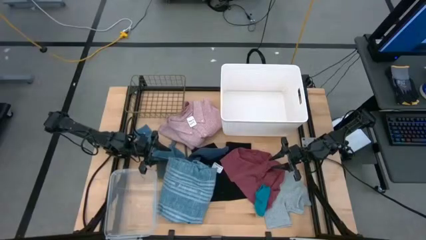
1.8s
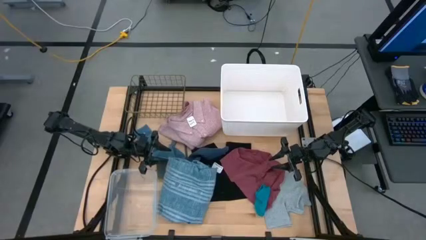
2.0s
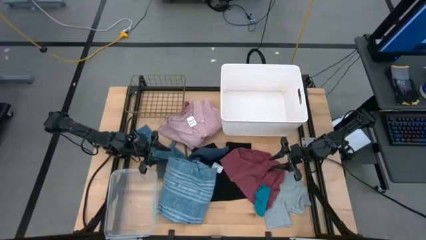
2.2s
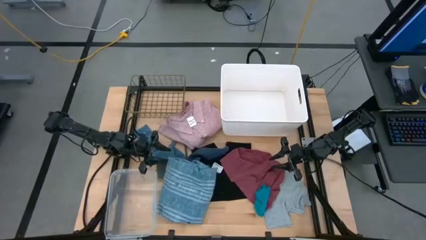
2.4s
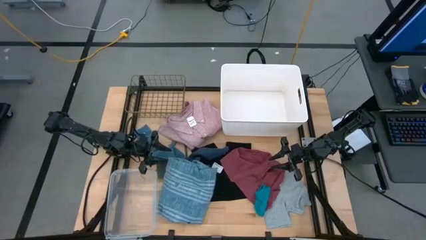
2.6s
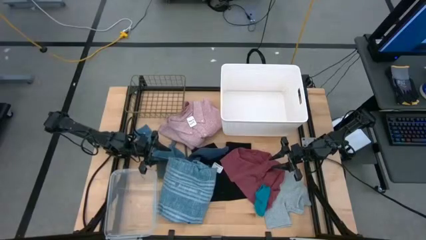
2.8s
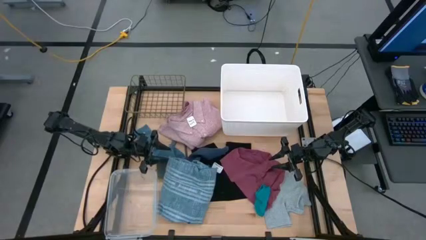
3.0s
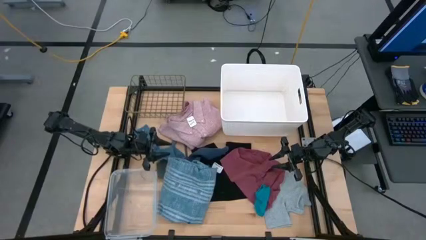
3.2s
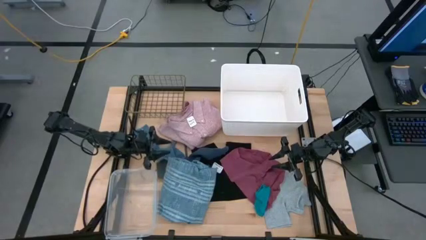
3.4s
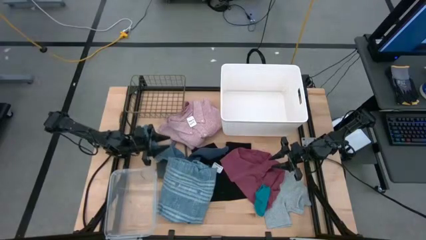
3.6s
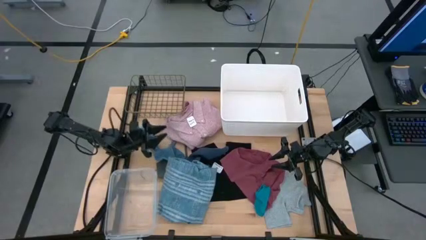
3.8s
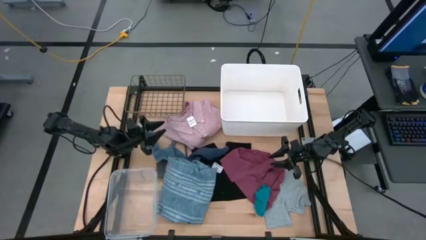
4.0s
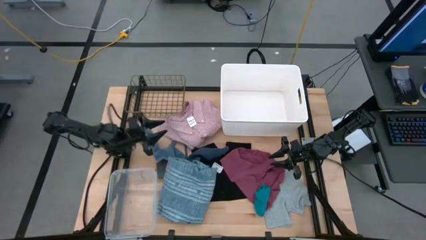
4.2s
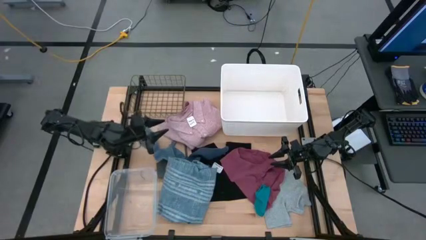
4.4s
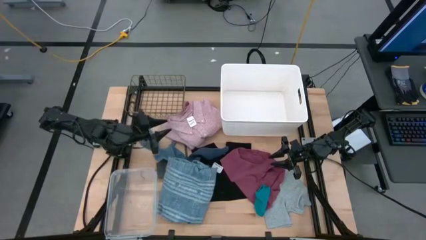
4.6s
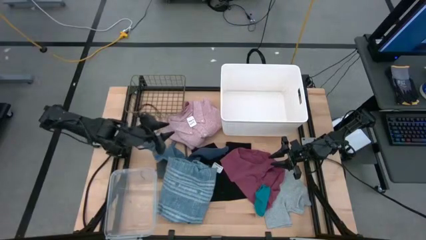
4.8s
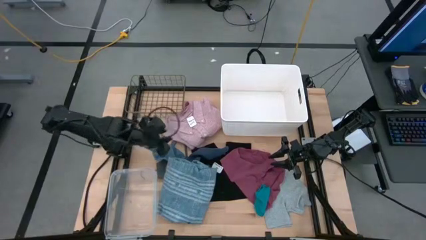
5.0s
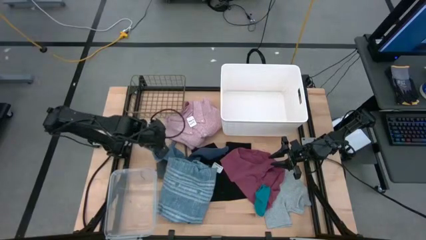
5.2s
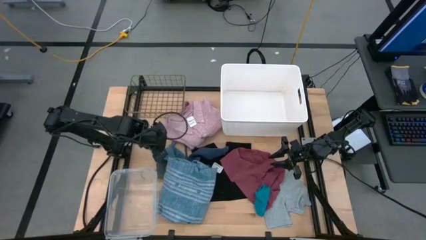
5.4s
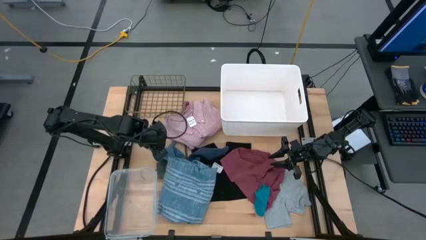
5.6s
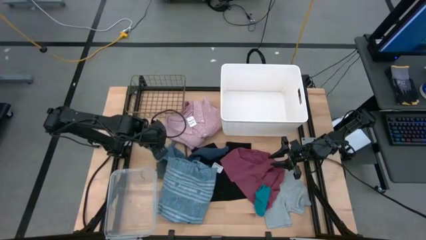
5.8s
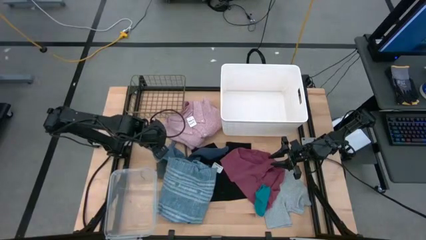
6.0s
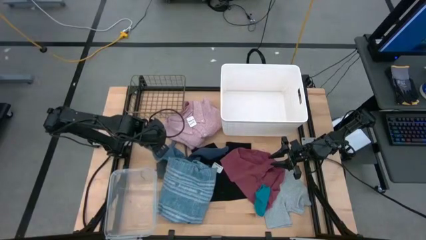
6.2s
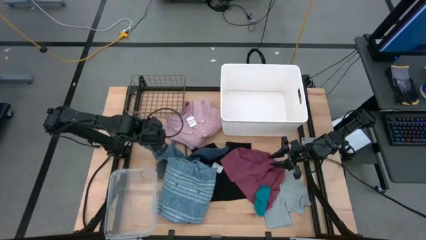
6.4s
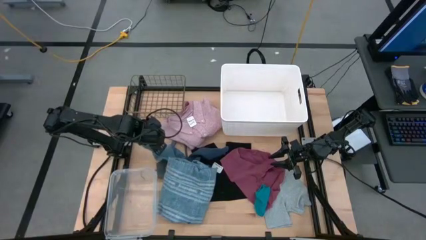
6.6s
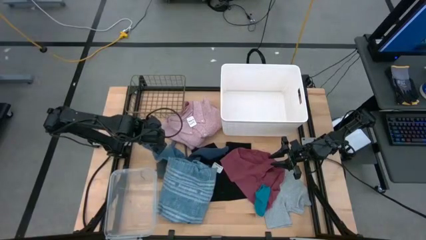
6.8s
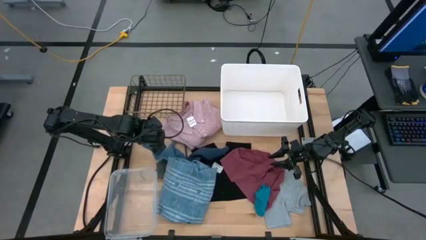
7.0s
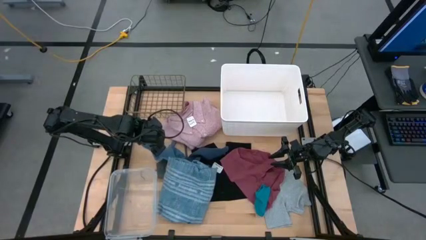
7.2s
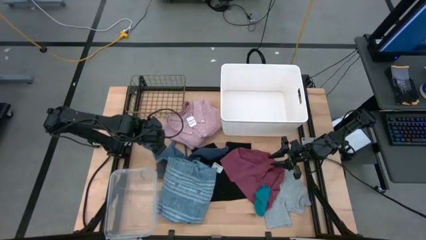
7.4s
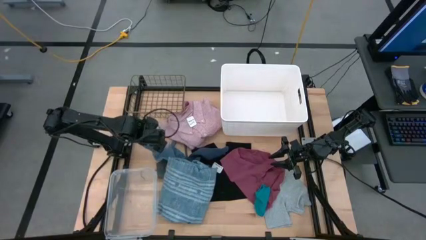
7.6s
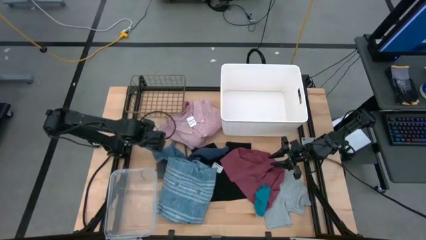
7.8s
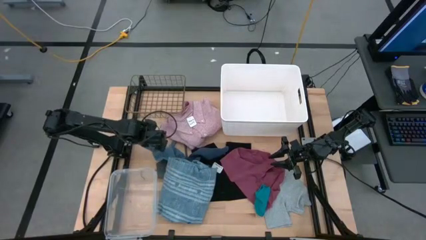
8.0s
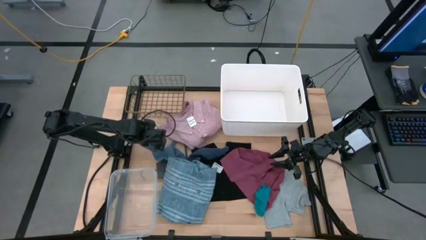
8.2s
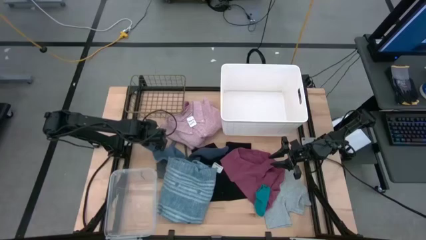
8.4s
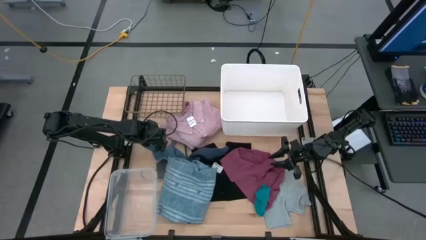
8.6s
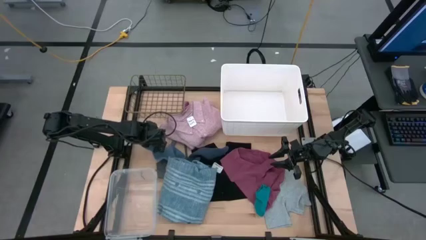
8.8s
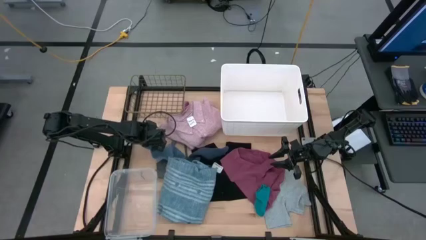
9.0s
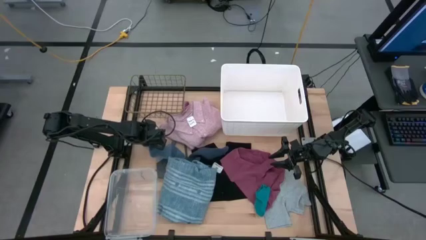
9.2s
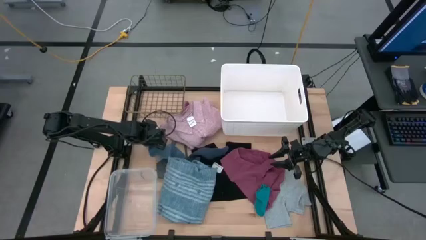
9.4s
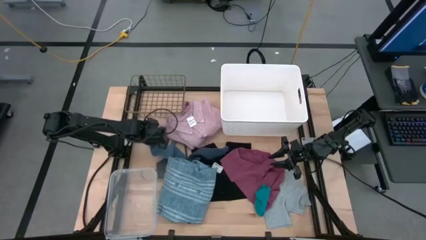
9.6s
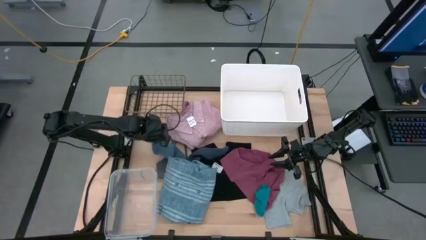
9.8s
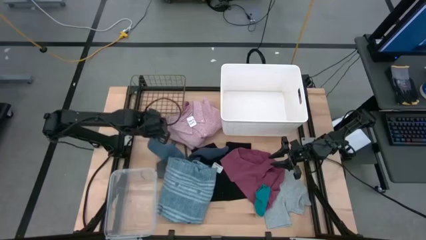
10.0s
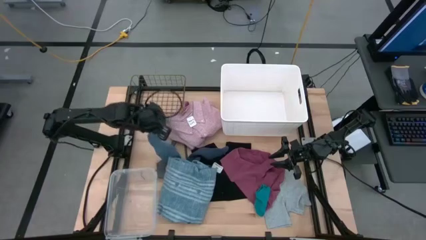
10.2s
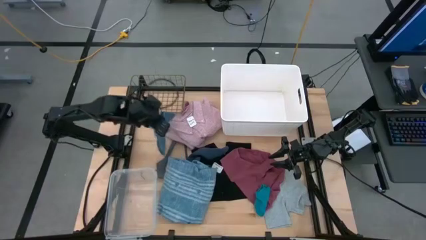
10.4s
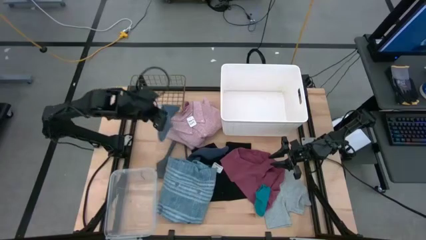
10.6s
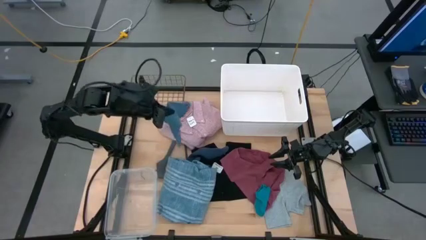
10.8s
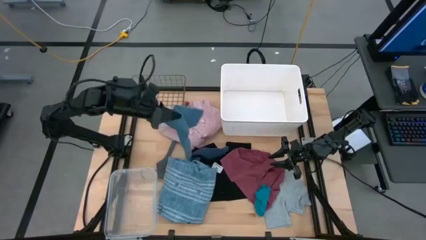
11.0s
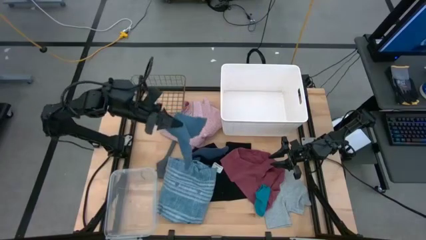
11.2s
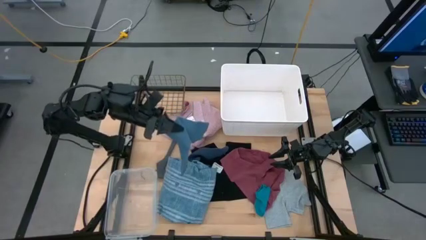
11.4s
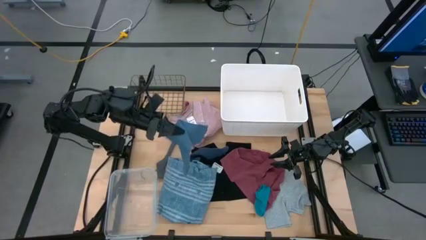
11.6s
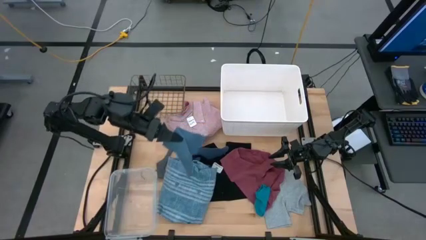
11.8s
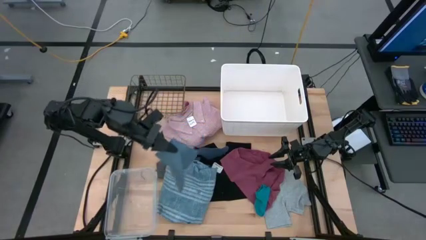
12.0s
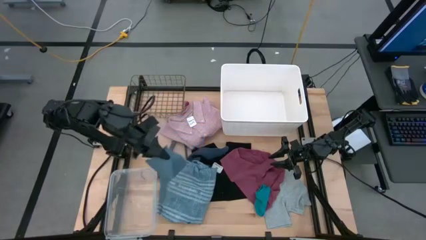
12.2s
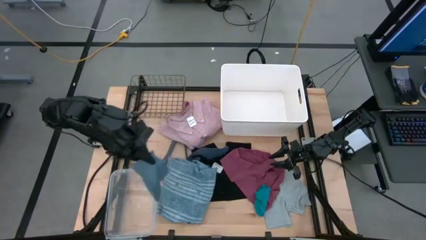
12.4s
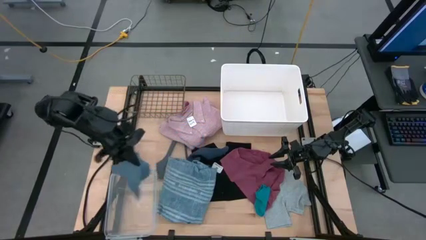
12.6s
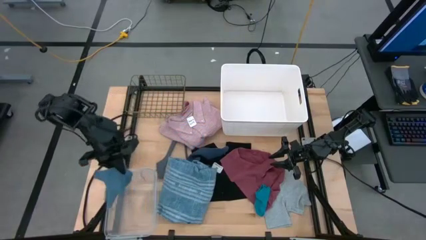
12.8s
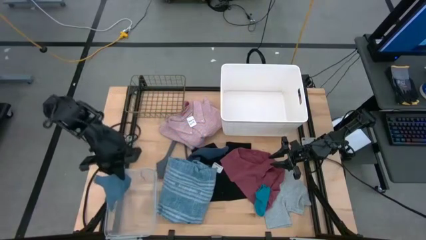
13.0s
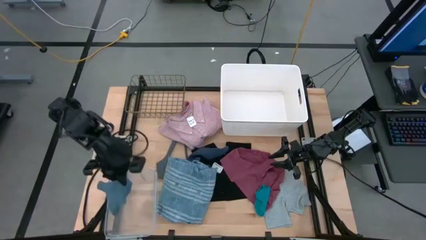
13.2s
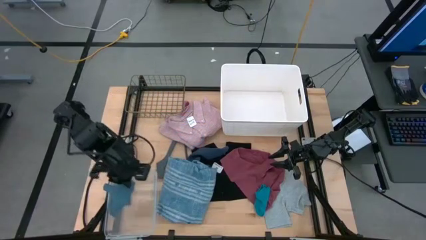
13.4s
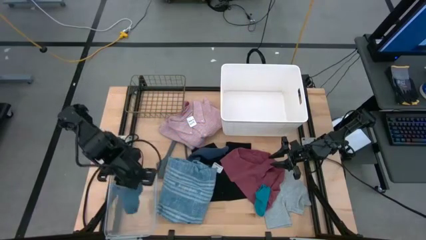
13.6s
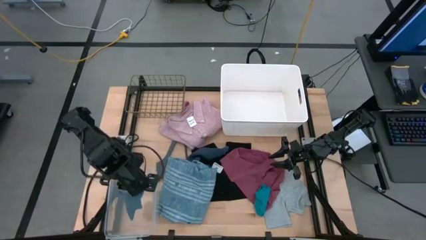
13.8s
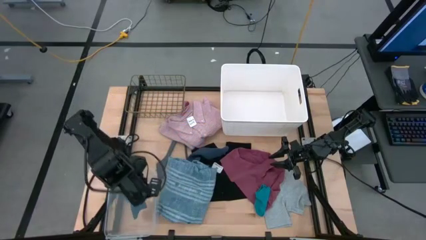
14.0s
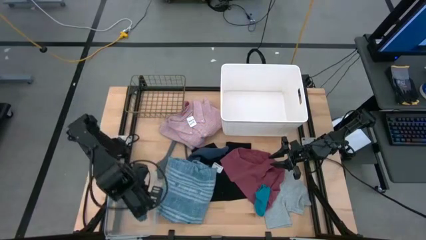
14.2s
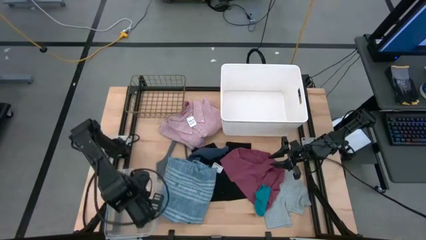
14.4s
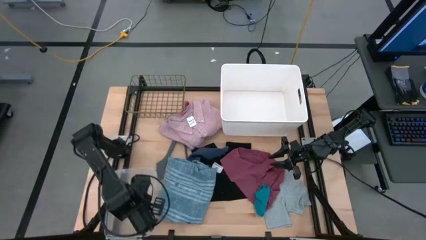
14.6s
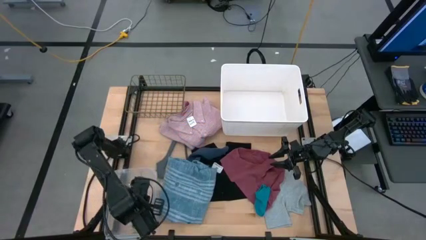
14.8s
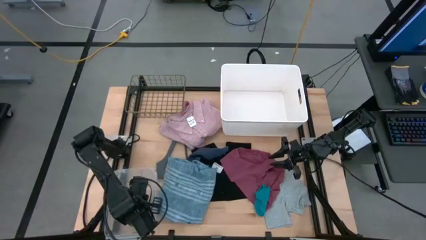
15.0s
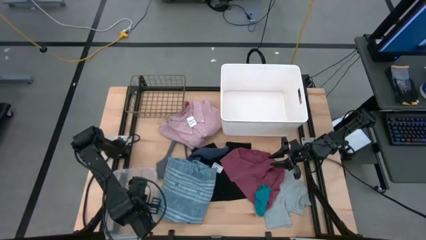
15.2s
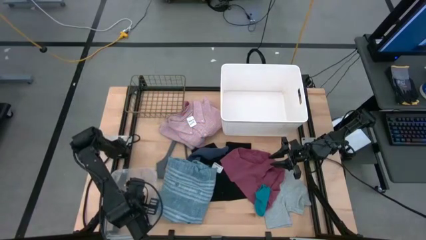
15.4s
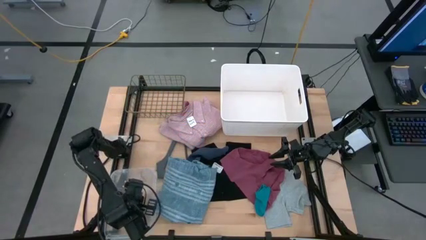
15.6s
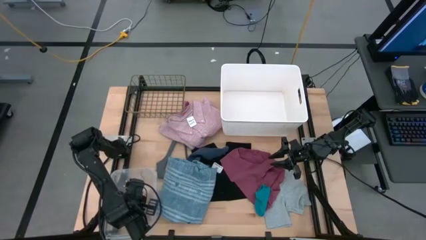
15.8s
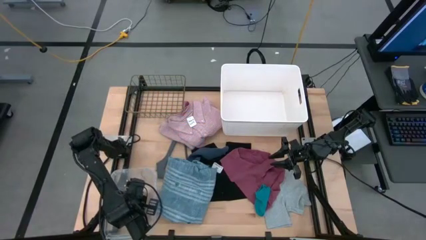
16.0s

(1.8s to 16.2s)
Task: Pick & Place Cloths
Put the left gray sock into the transparent container
